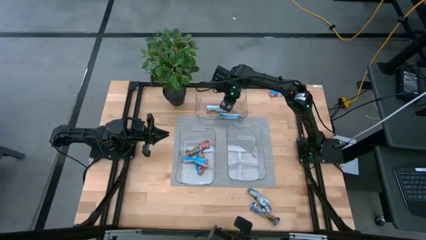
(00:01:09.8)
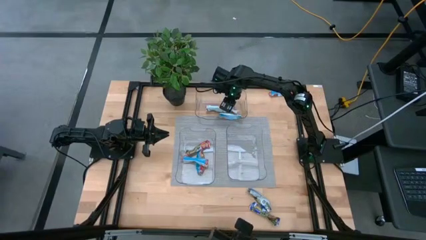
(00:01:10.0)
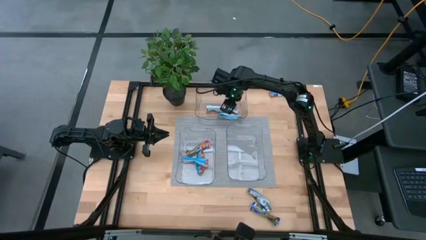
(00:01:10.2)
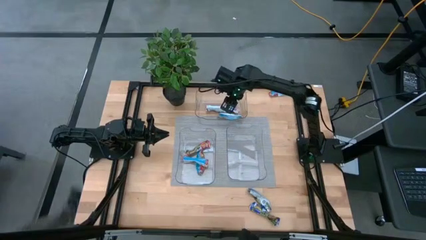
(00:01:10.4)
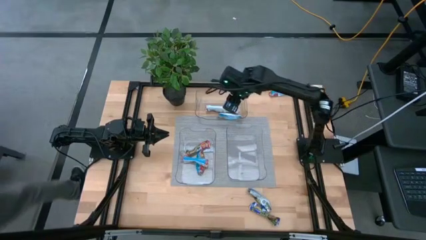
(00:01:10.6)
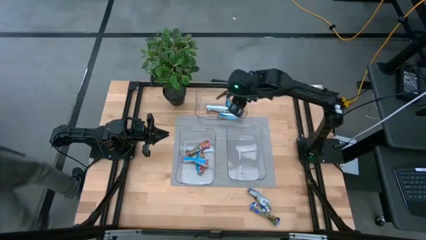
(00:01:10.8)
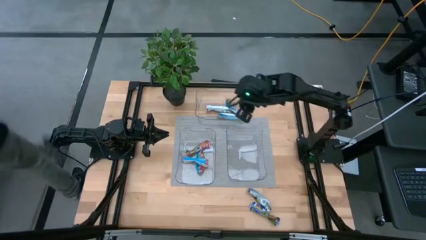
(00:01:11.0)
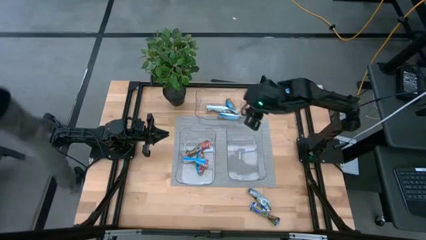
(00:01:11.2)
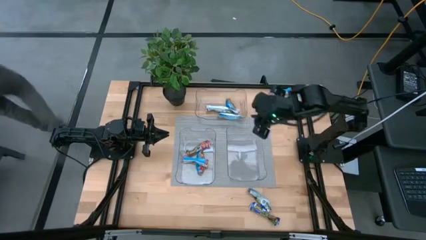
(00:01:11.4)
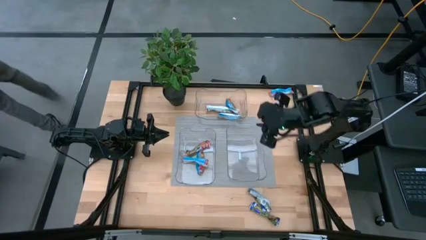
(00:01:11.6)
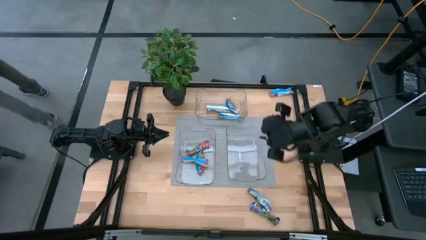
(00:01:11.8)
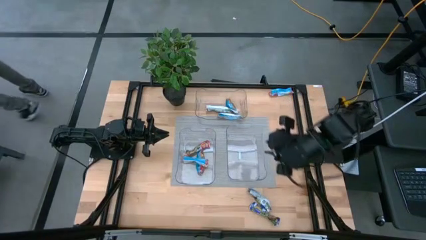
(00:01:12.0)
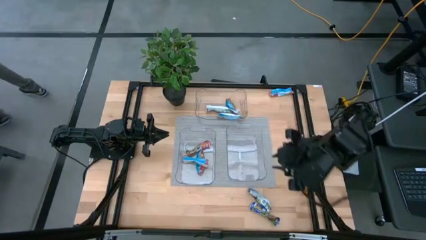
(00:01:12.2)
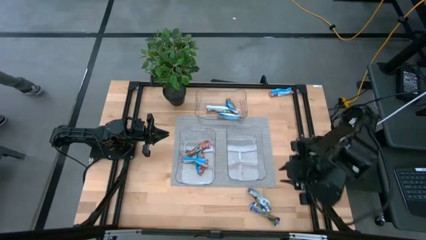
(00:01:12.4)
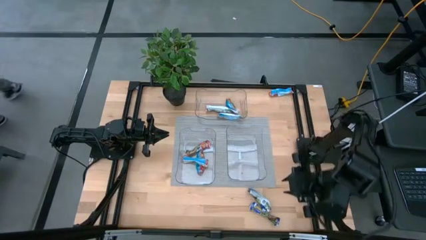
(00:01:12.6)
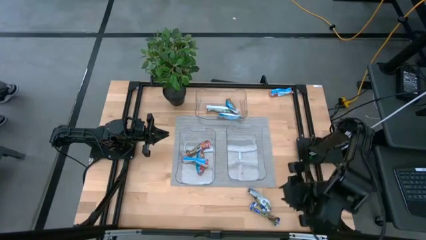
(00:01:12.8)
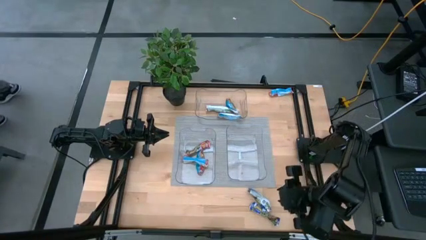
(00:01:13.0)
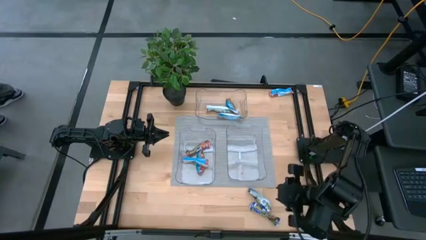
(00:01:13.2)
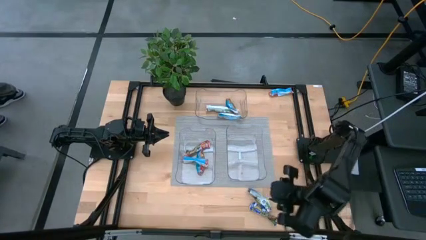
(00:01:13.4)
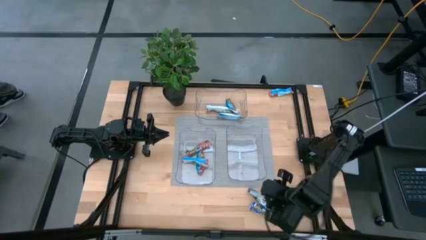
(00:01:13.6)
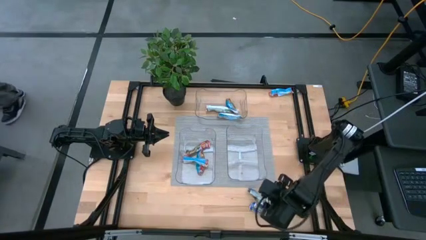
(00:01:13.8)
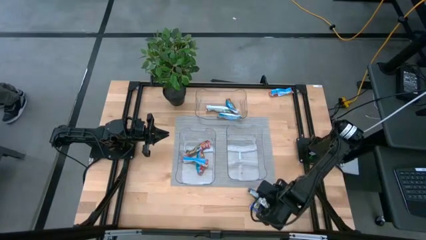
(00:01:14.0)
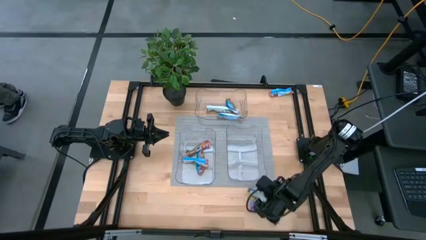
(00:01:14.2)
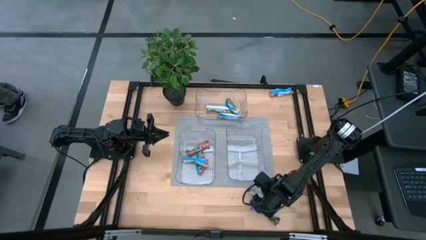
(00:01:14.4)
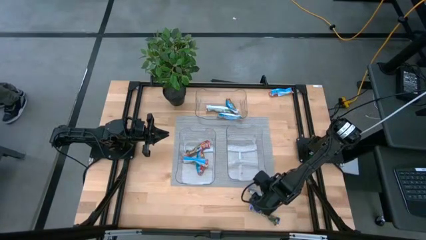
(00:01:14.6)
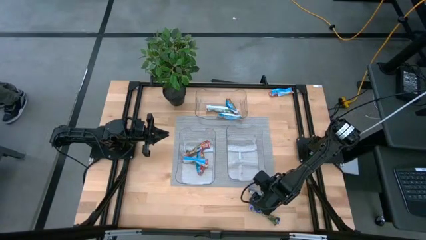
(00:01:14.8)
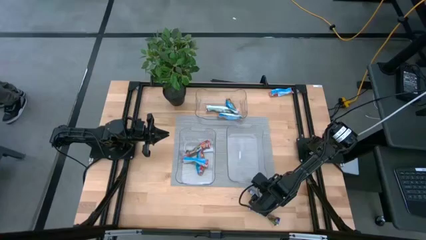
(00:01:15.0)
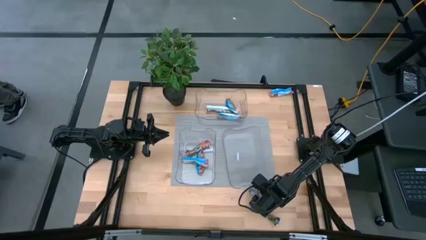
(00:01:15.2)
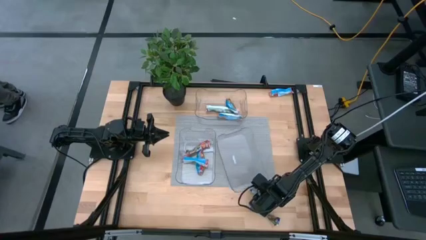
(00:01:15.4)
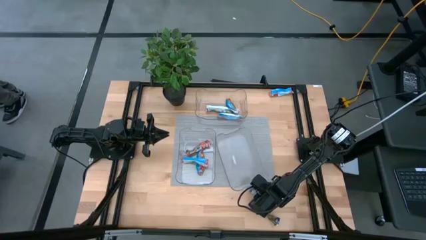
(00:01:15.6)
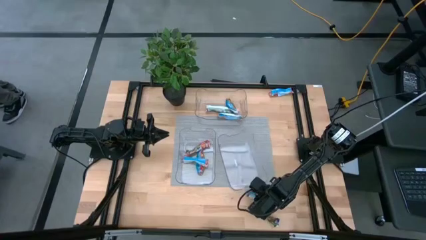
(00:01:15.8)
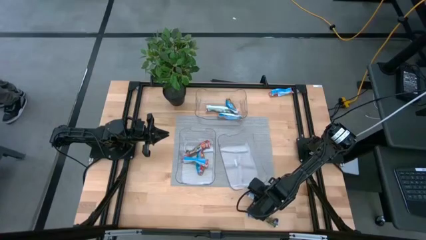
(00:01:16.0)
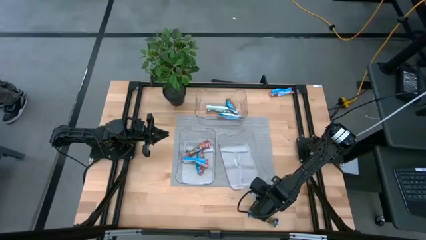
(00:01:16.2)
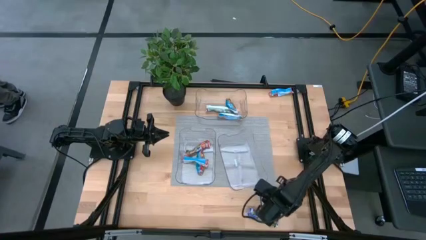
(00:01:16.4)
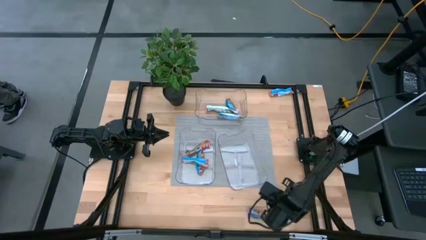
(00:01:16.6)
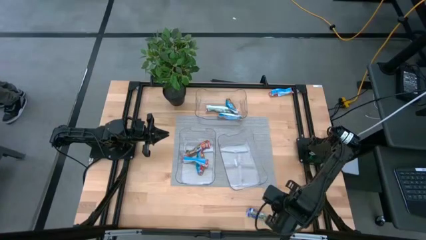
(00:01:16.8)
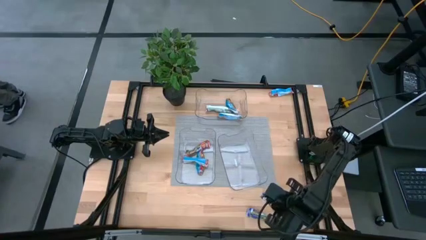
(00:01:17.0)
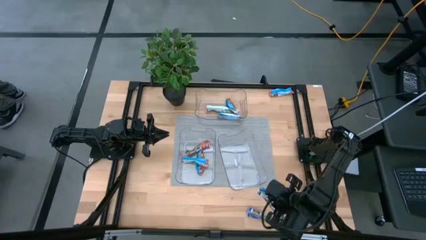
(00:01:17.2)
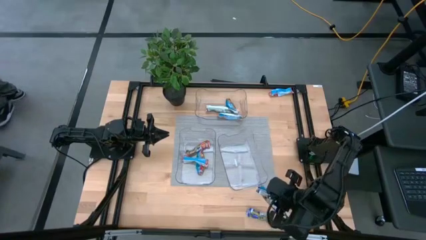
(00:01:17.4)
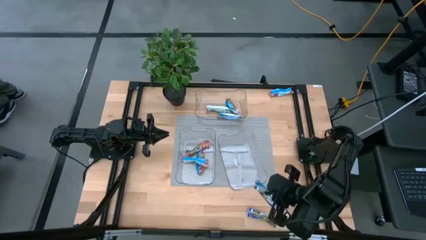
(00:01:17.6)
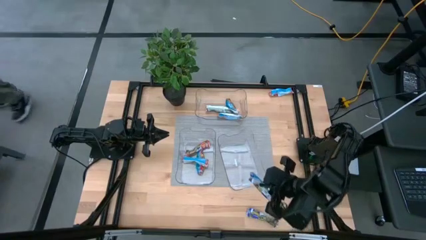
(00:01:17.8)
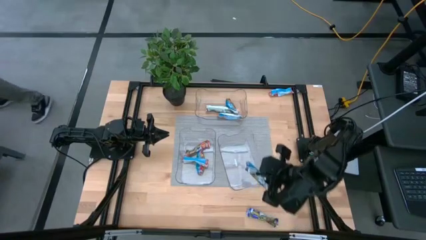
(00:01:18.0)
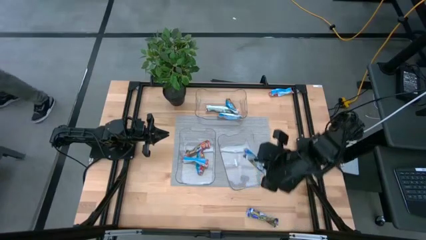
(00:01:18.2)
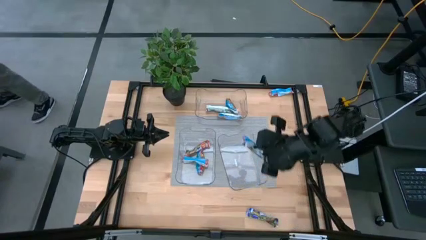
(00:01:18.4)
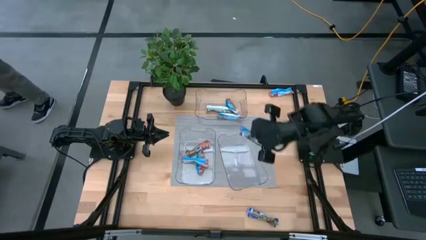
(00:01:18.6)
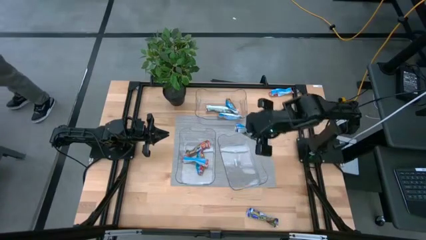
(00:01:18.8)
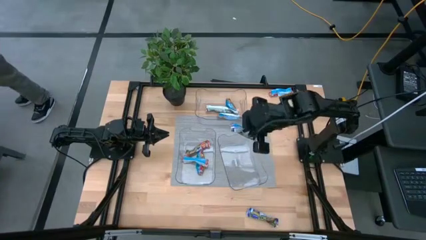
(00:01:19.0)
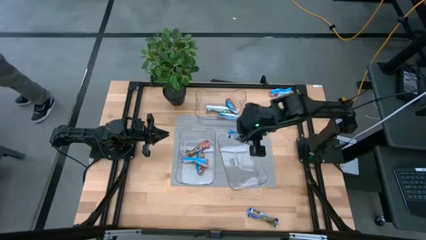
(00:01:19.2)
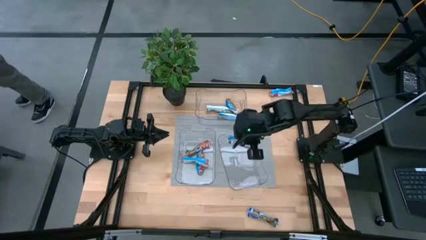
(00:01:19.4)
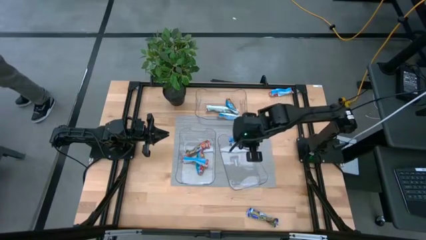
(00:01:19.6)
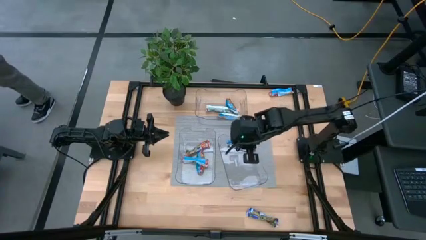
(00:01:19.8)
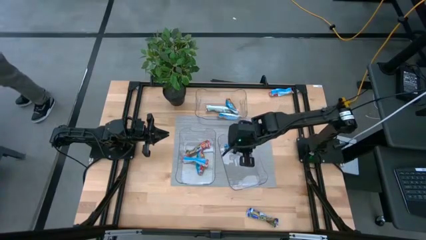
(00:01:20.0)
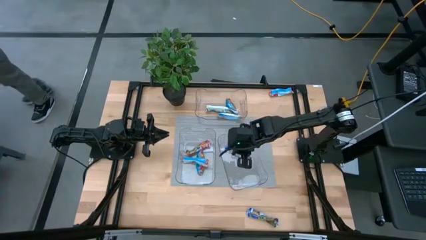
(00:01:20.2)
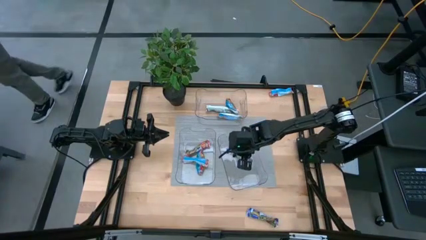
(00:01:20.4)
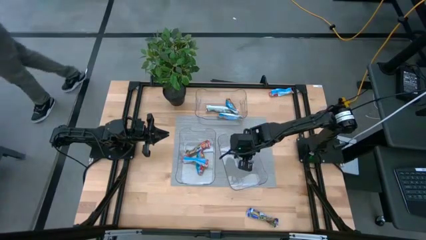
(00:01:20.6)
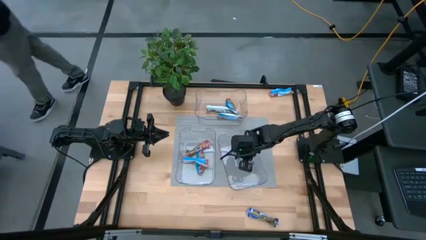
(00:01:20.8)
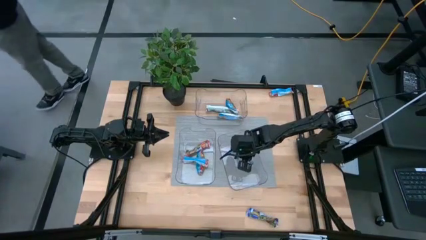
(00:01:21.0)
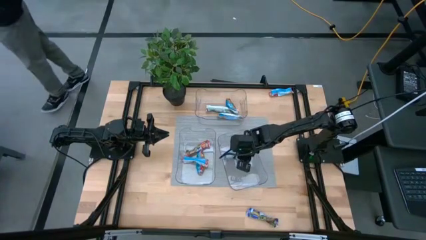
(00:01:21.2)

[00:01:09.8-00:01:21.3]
Task: Pick and place Granola Bars by type
Put the blue granola bar into the bottom right transparent bin

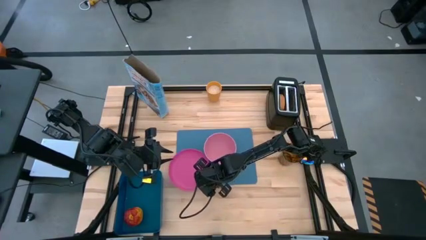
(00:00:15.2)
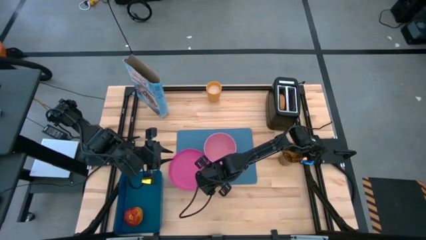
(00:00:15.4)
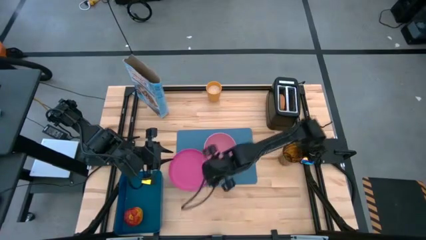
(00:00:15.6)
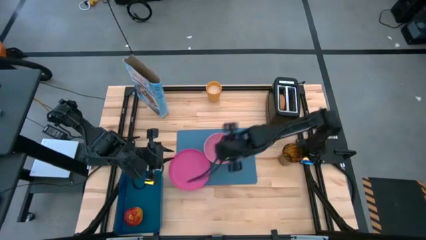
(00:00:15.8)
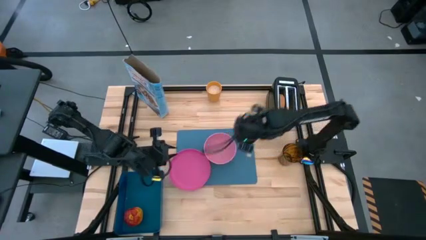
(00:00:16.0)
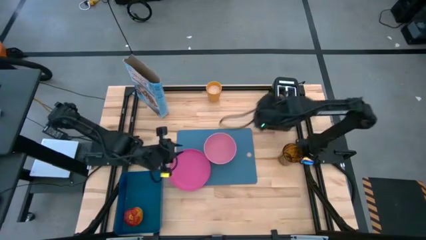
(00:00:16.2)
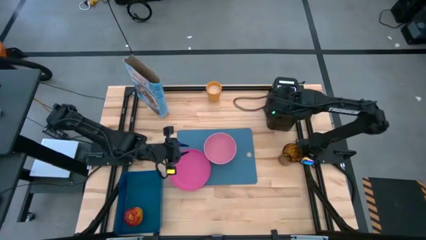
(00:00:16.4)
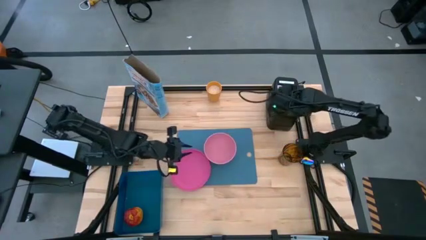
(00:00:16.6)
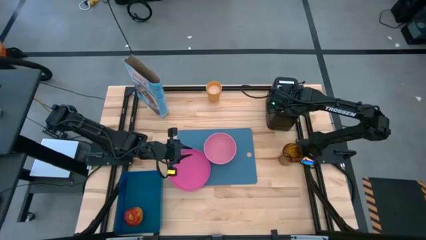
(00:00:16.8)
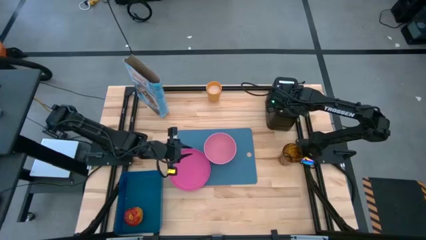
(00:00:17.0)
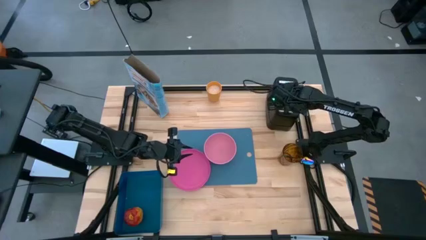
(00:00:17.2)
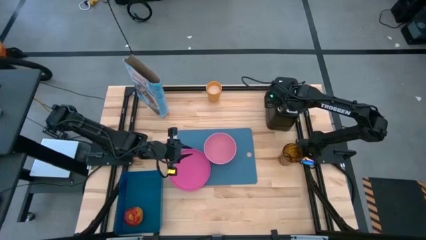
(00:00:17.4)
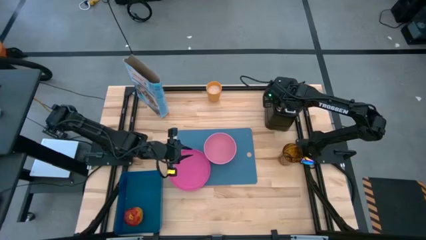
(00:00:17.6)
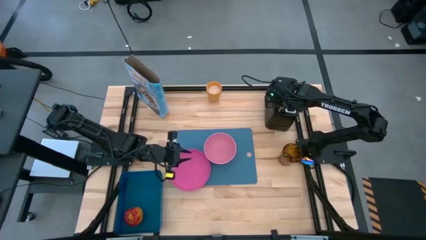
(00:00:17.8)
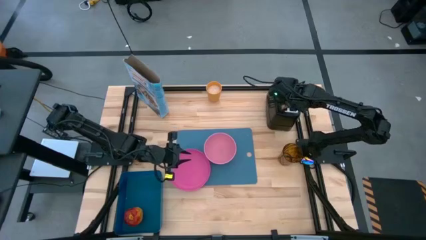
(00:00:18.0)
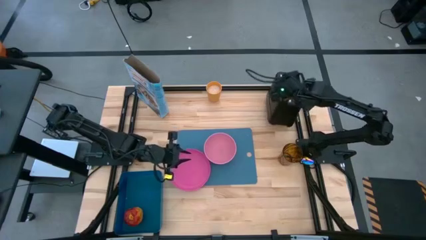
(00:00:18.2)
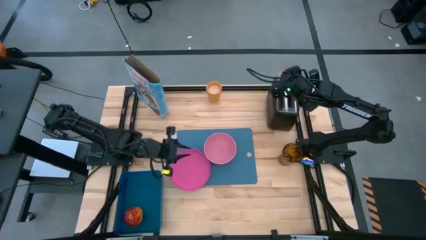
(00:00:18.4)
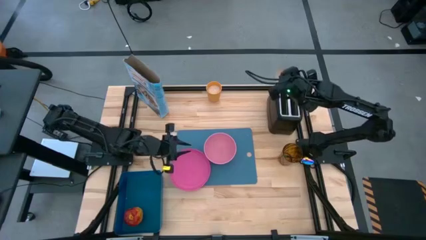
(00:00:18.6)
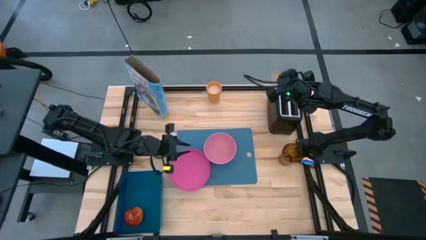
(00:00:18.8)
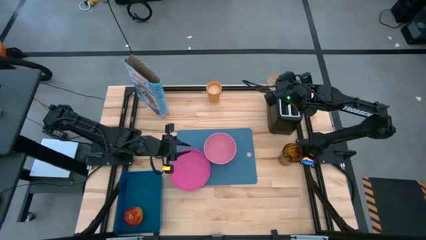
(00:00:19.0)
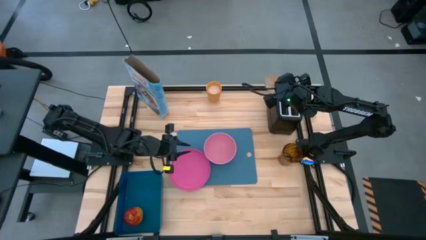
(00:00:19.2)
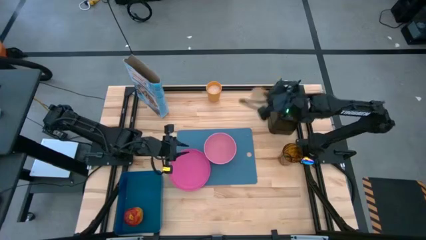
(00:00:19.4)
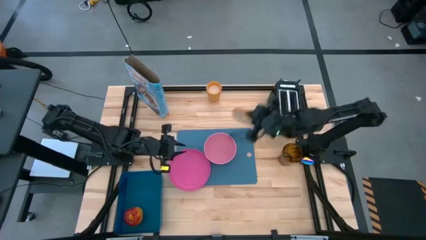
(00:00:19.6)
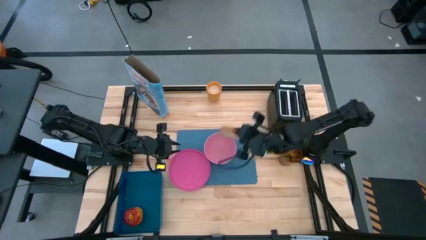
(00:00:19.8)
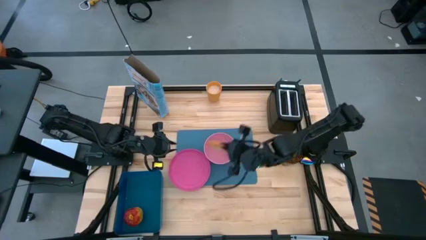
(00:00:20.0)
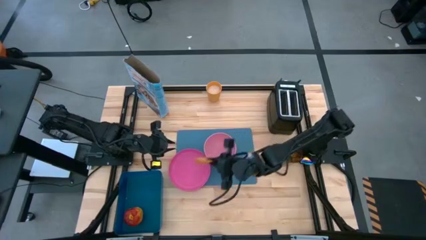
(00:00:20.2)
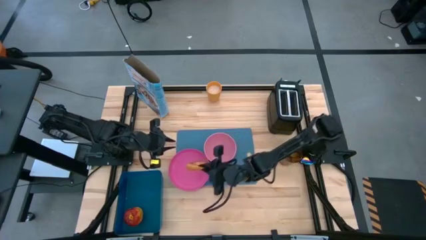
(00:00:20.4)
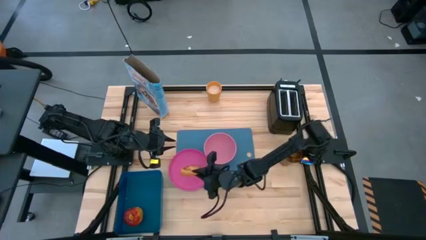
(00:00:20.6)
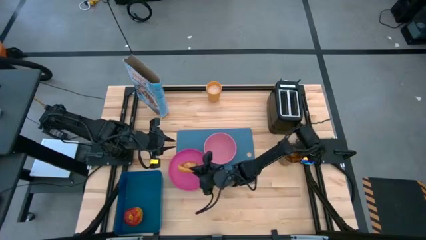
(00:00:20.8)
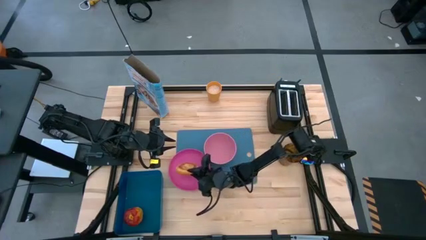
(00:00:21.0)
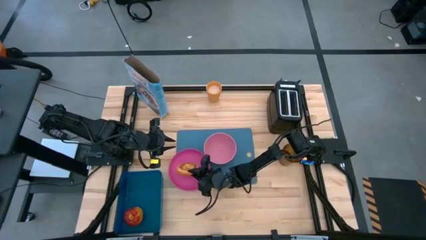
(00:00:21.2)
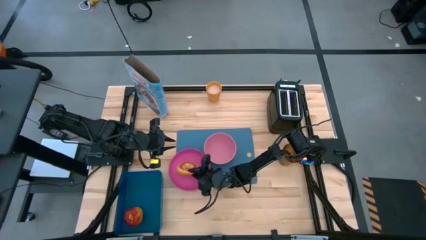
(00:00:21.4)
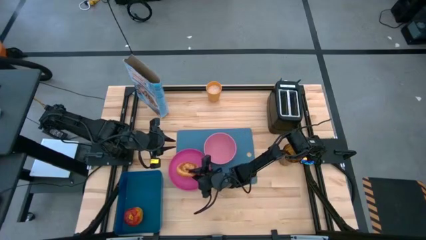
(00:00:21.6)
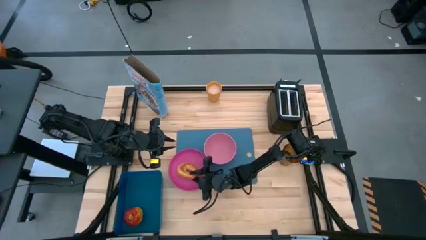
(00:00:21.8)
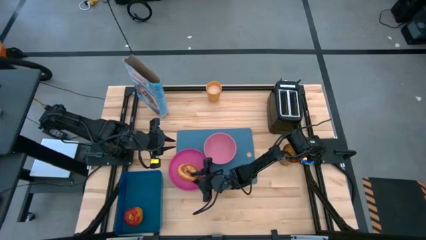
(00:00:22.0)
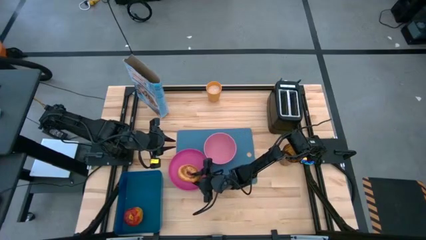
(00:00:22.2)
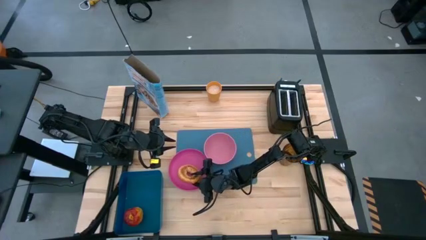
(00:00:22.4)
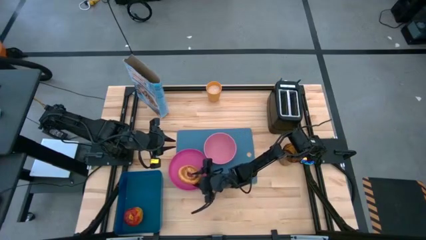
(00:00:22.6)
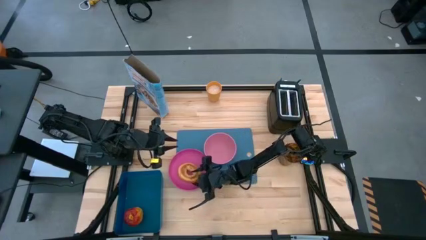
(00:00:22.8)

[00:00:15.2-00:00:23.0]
Task: Arrange a breakfast setting
Put the toasted bagel on the pink plate
